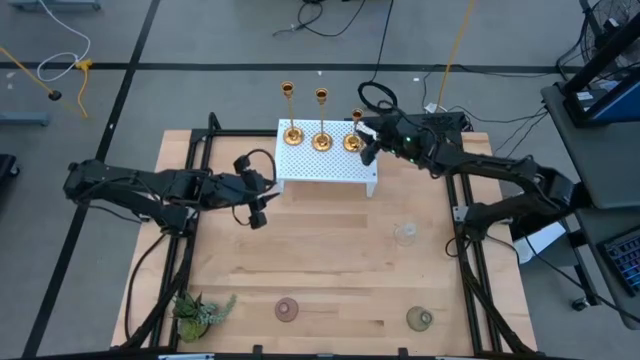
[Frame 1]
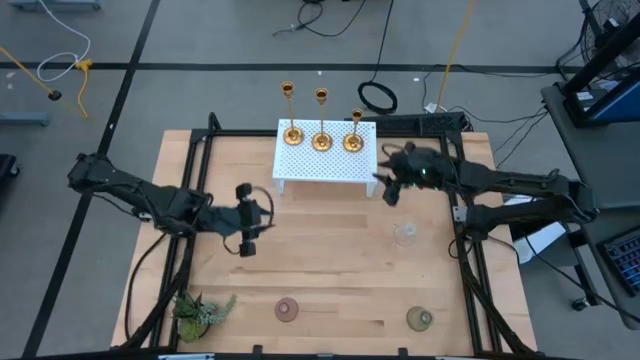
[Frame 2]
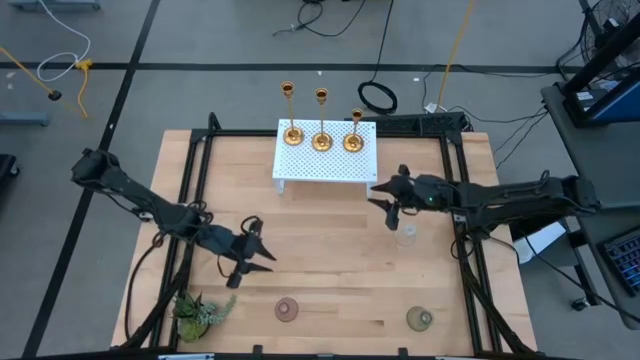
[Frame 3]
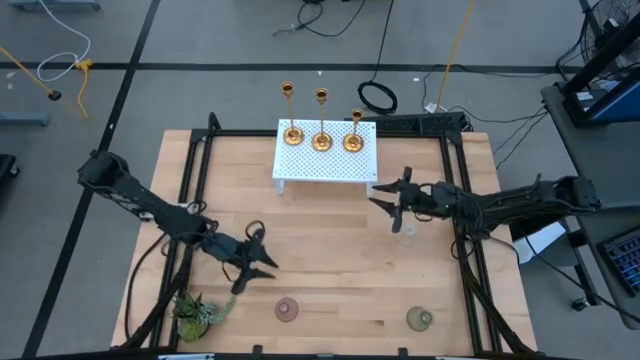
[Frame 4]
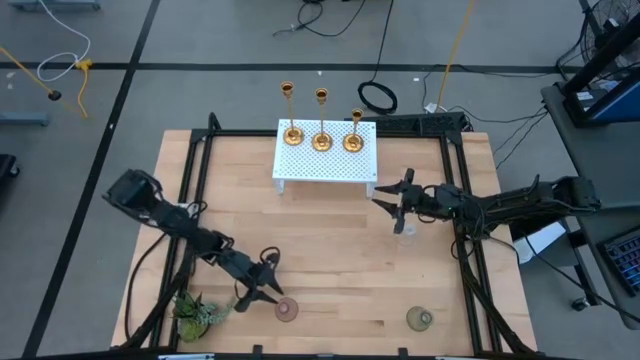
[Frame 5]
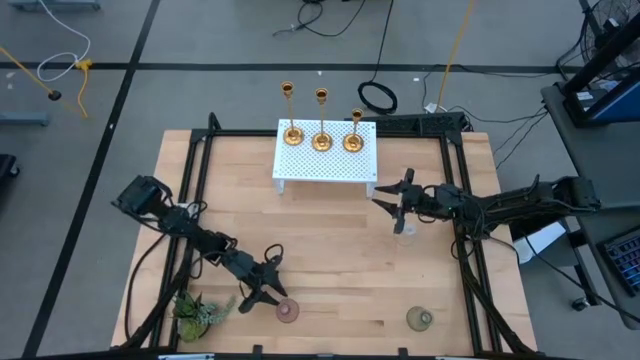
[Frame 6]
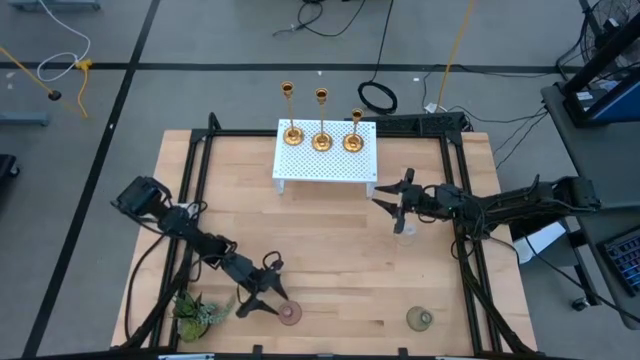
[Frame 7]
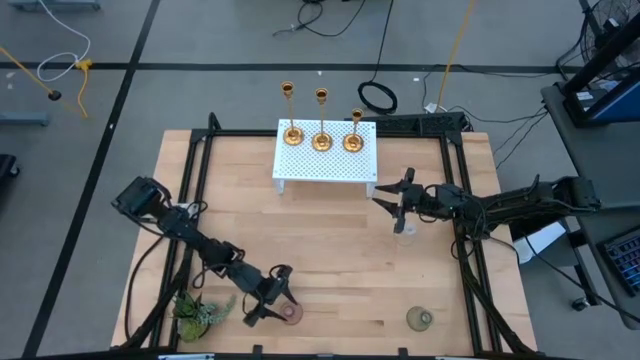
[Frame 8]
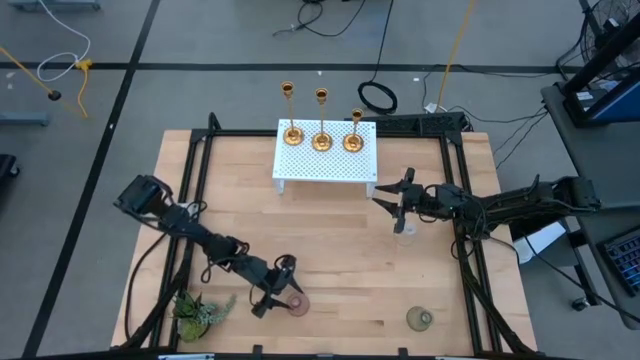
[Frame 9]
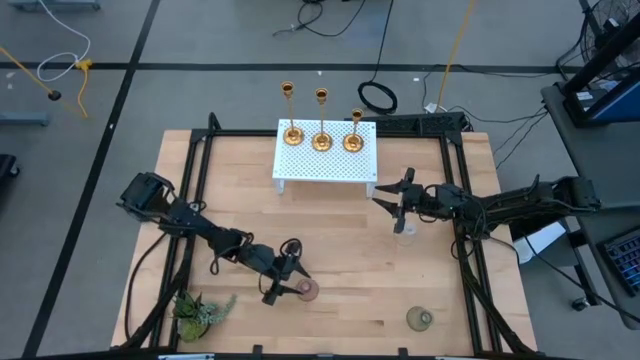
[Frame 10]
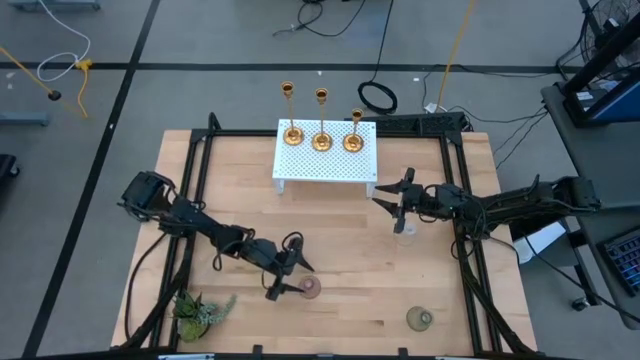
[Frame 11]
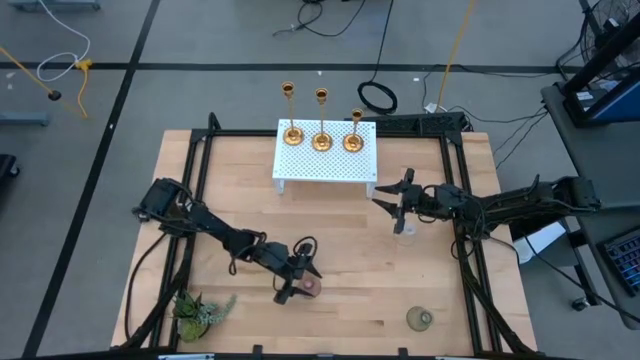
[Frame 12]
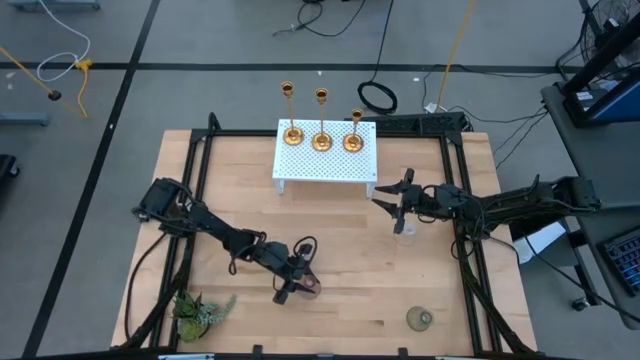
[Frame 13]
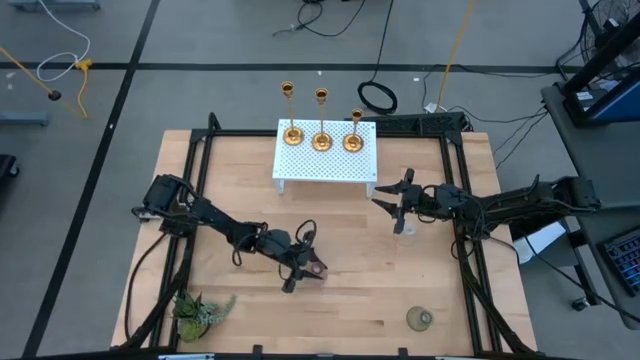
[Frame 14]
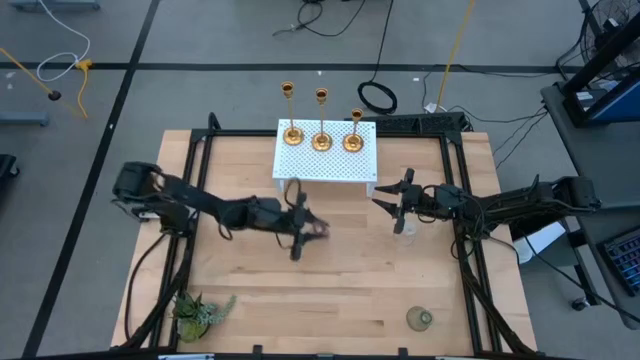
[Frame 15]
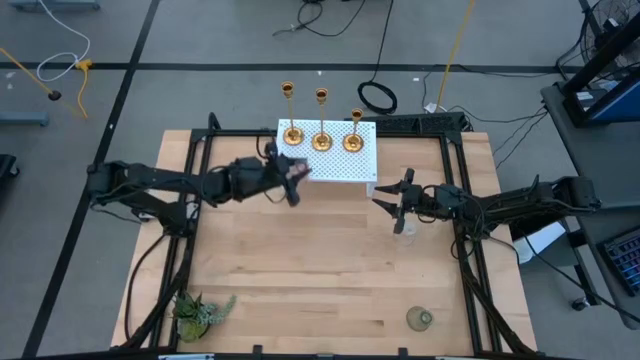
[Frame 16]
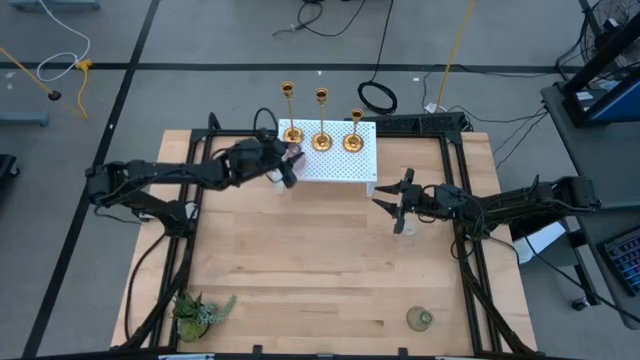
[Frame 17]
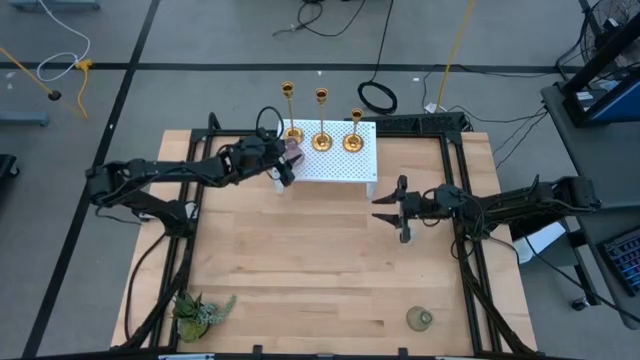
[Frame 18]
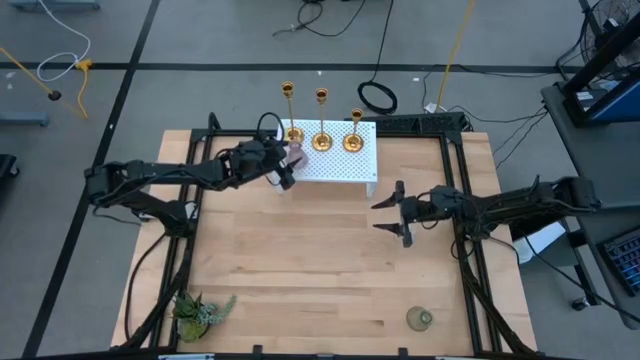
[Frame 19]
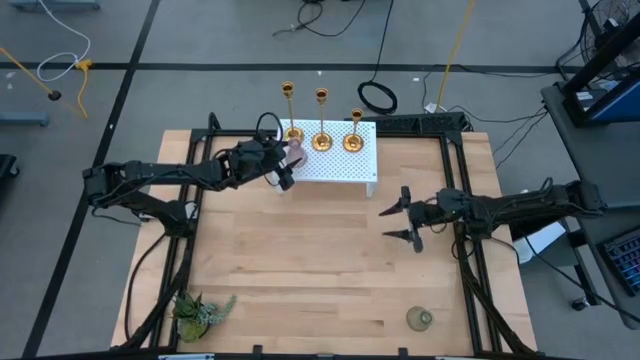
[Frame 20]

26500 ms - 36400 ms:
Task: Pick & Place candle stick holders
Put the bottom left pink glass candle holder aligned with the golden candle holder on the shelf

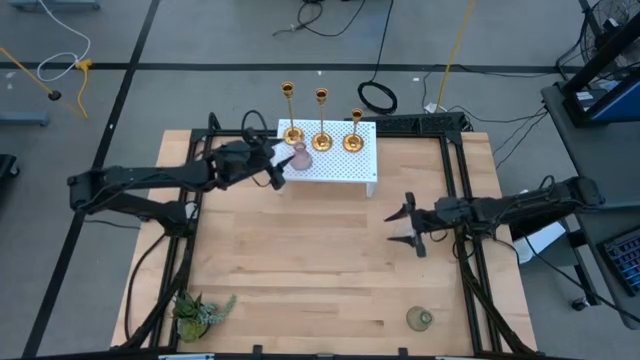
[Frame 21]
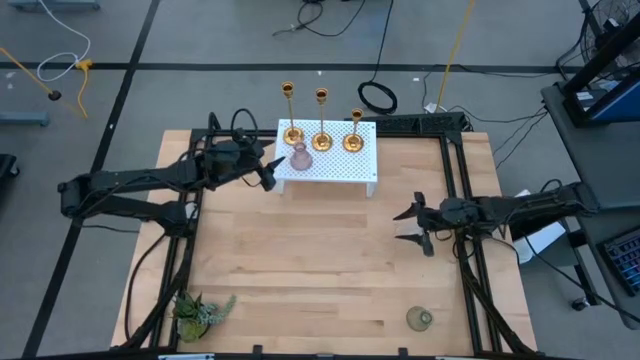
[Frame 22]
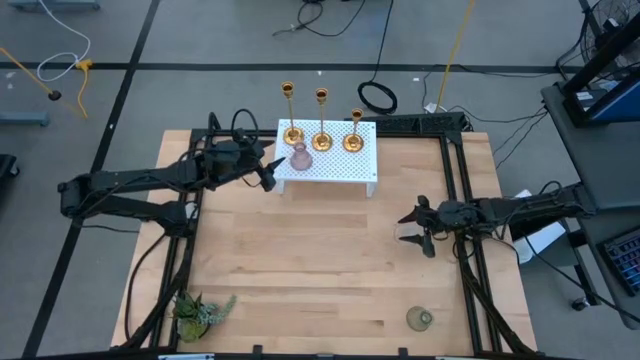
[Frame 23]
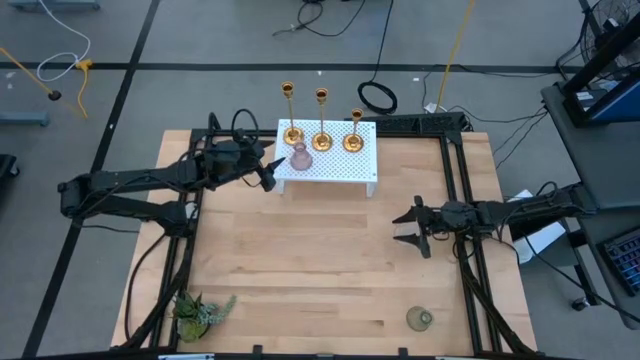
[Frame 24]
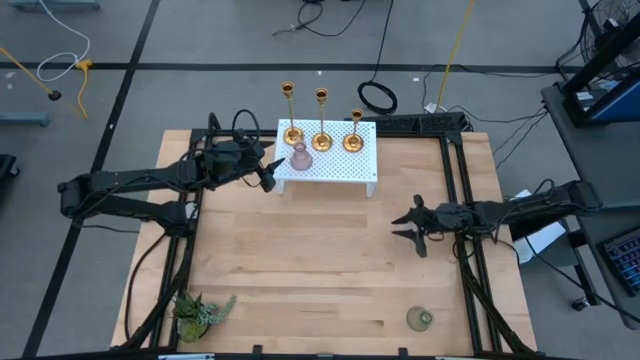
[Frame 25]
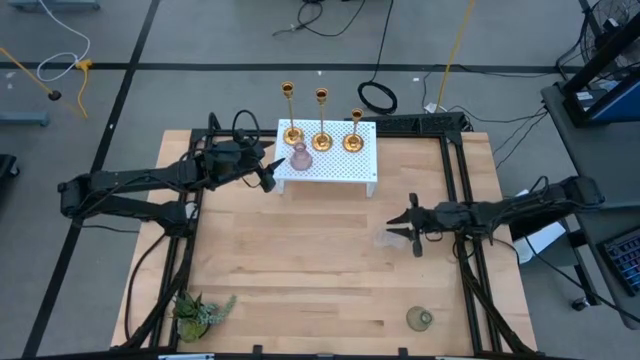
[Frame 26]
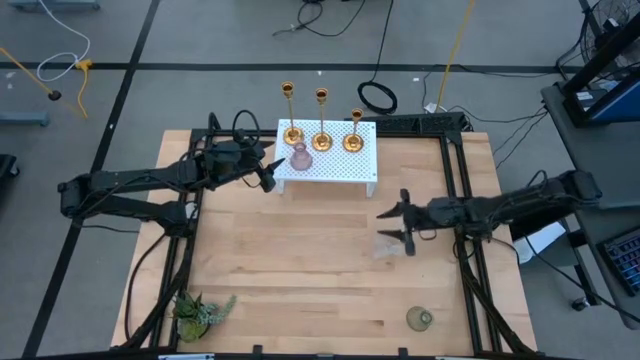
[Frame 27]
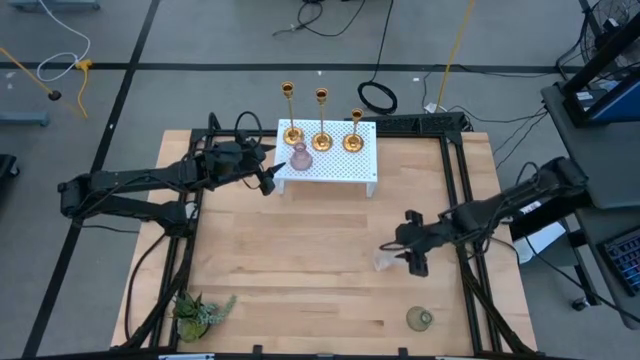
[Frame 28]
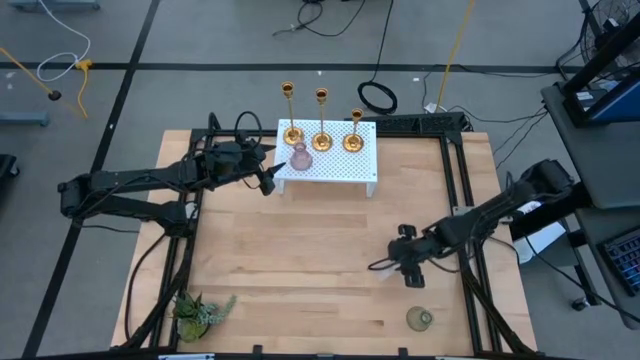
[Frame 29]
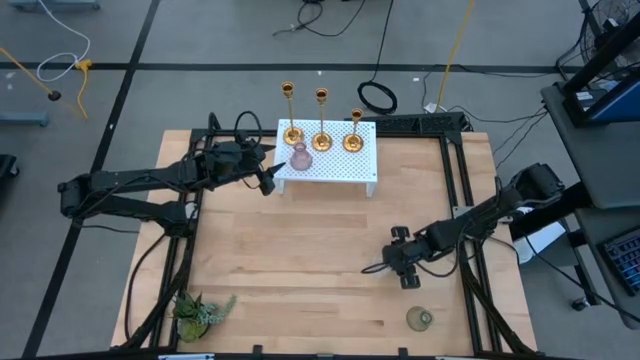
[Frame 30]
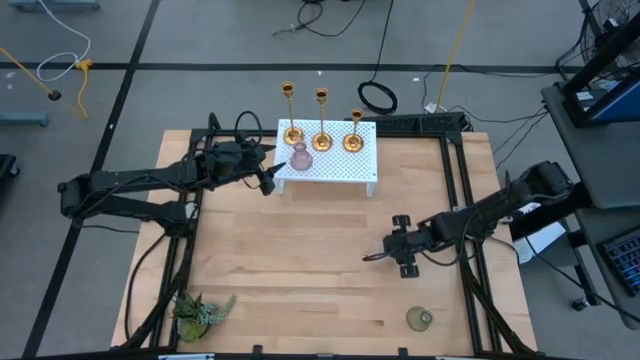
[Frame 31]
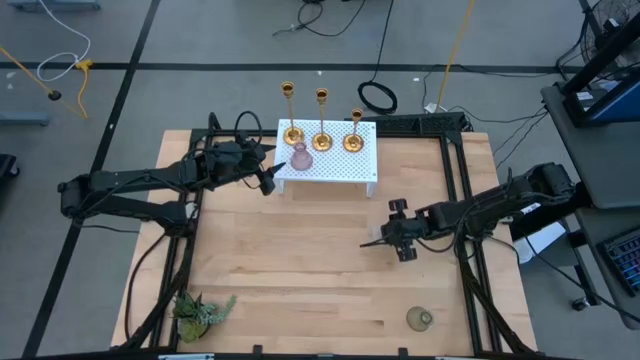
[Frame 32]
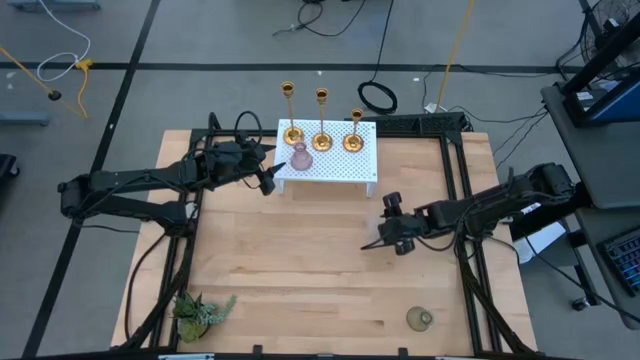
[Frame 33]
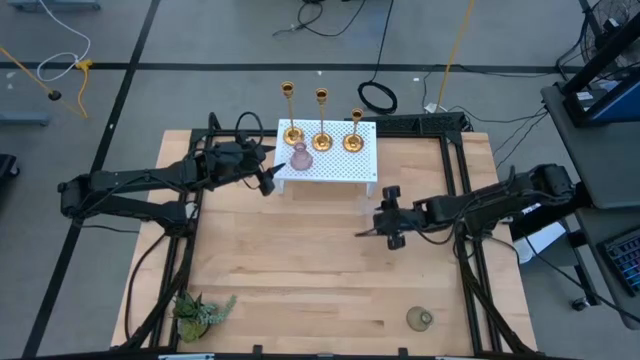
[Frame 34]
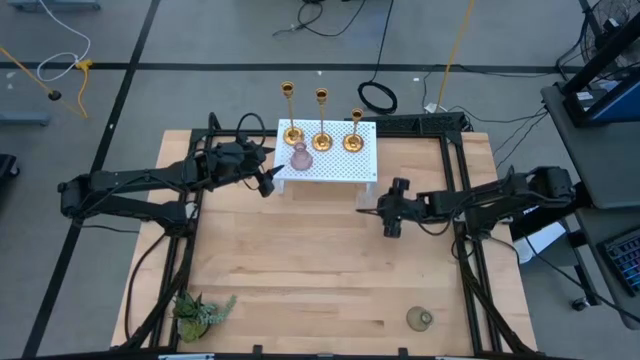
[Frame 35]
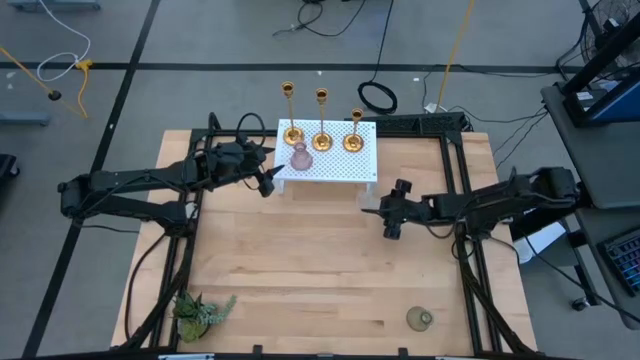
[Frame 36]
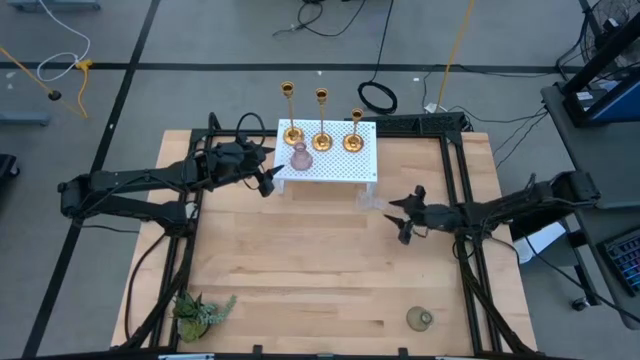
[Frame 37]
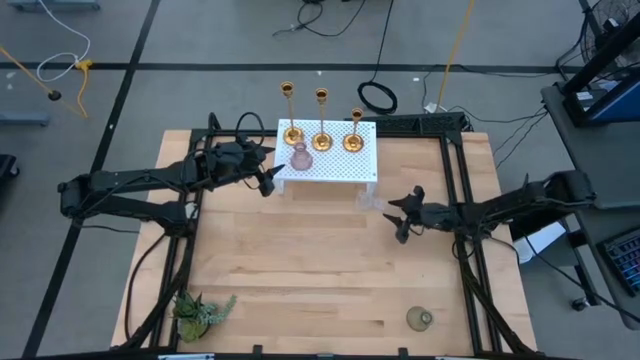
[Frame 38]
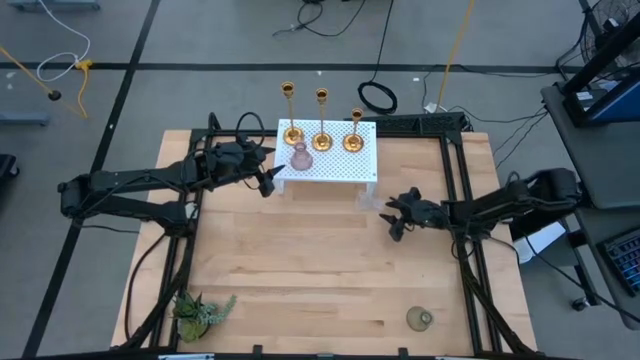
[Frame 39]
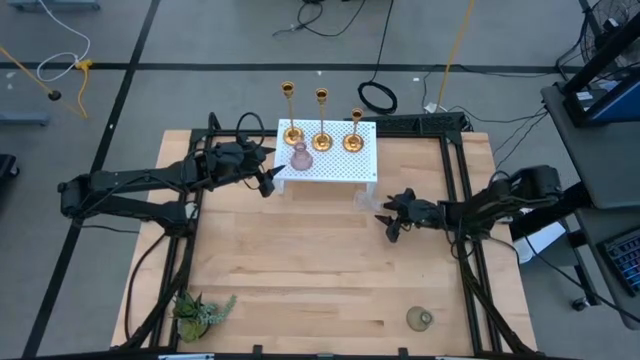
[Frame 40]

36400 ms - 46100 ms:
Put the middle right white glass candle holder aligned with the golden candle holder on the shelf

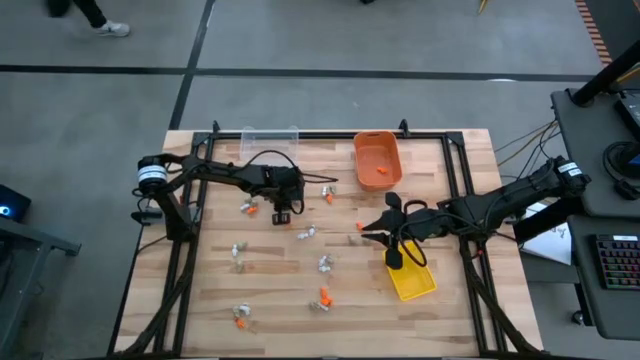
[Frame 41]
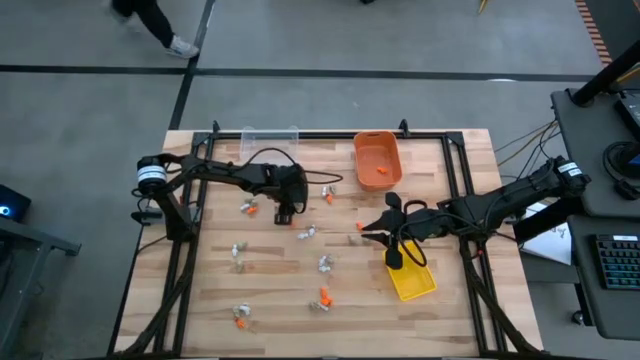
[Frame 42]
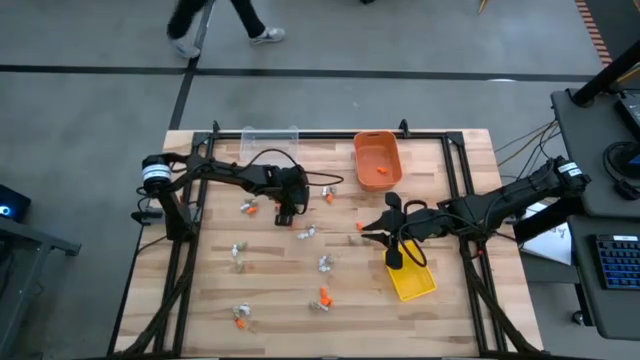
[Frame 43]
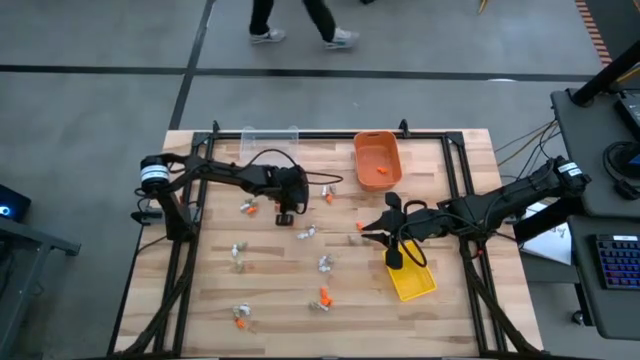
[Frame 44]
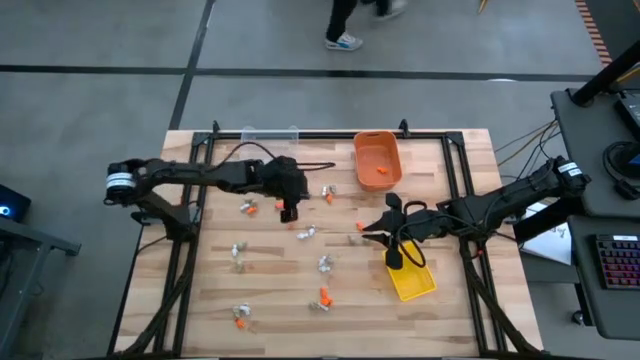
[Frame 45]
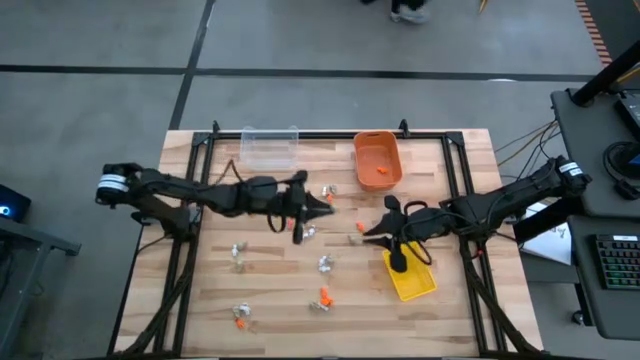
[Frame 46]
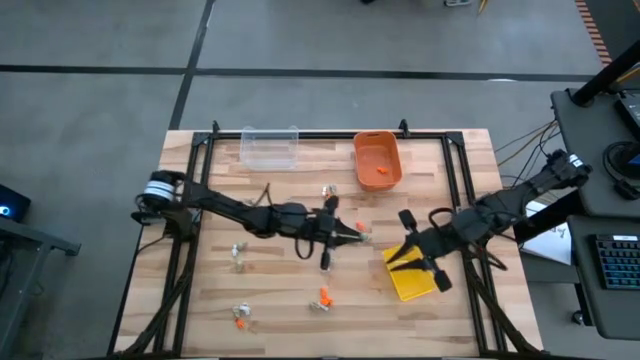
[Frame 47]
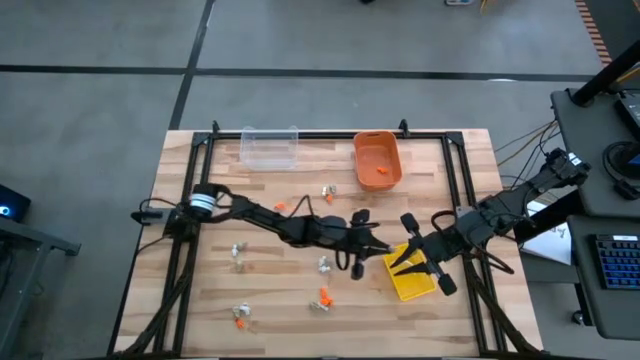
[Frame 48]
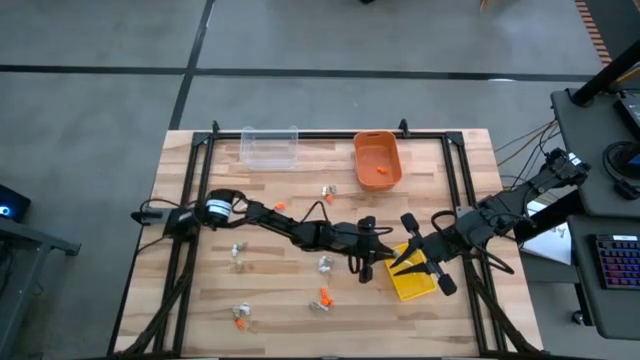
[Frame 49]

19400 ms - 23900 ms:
Task: Sort Halloween decoration
Put the gray skull toy into the yellow bin
